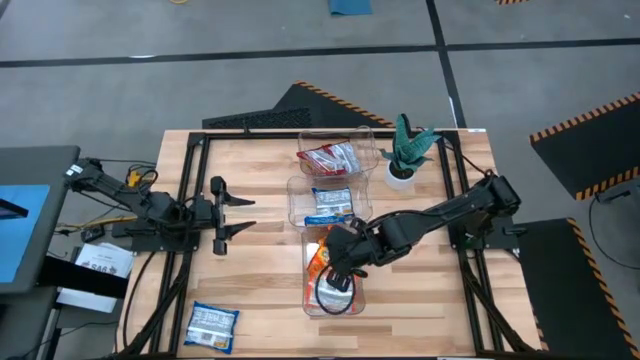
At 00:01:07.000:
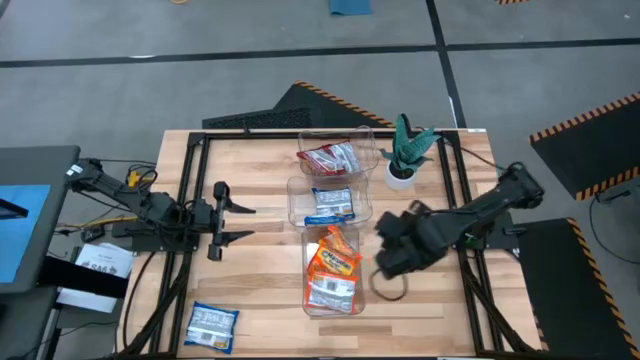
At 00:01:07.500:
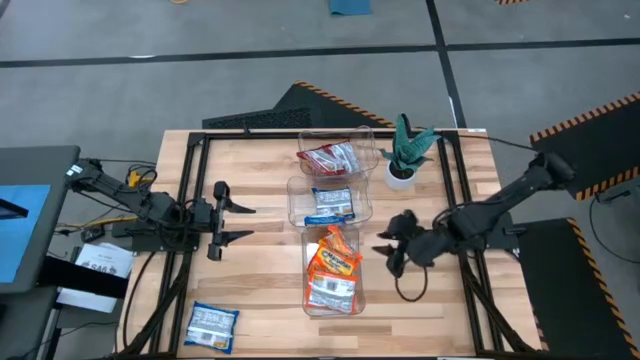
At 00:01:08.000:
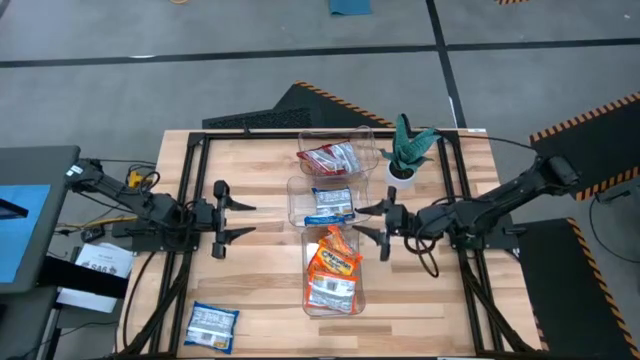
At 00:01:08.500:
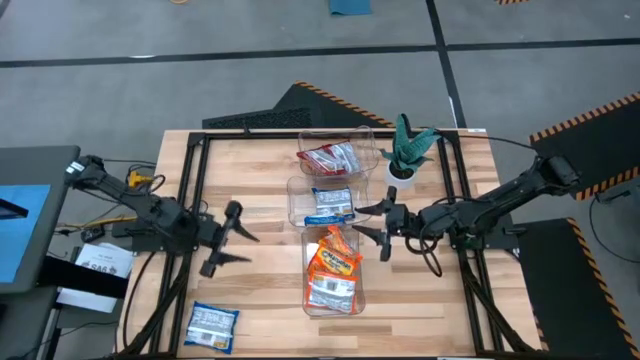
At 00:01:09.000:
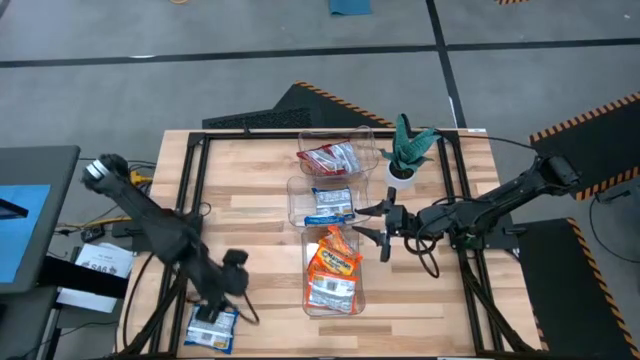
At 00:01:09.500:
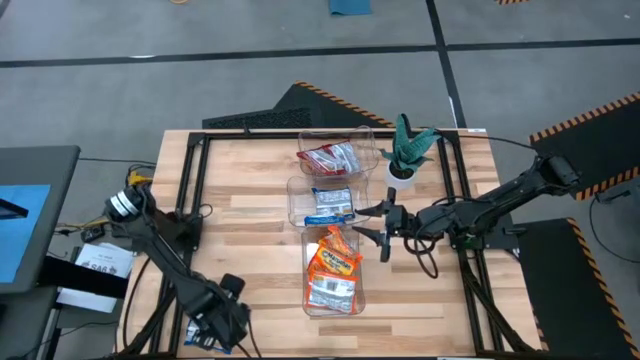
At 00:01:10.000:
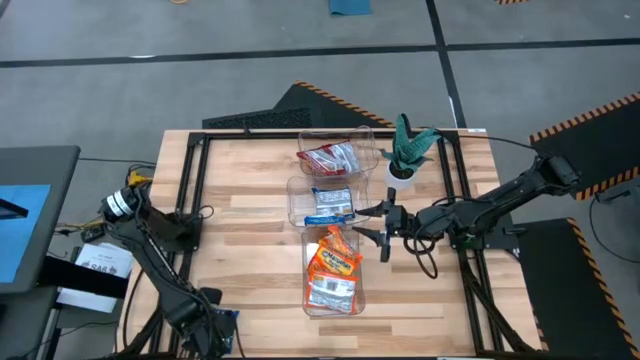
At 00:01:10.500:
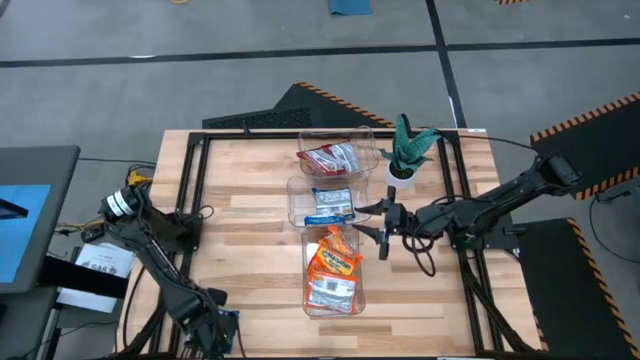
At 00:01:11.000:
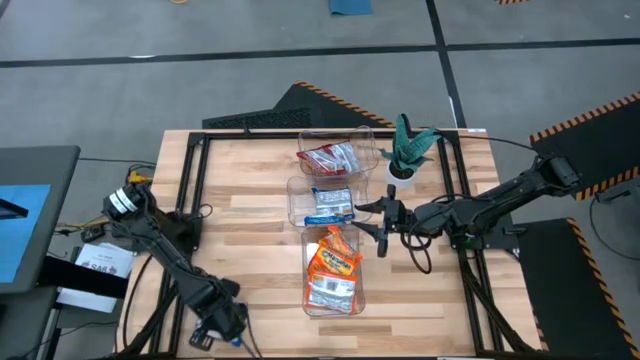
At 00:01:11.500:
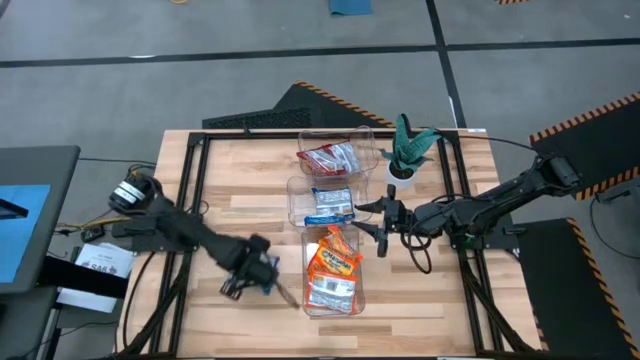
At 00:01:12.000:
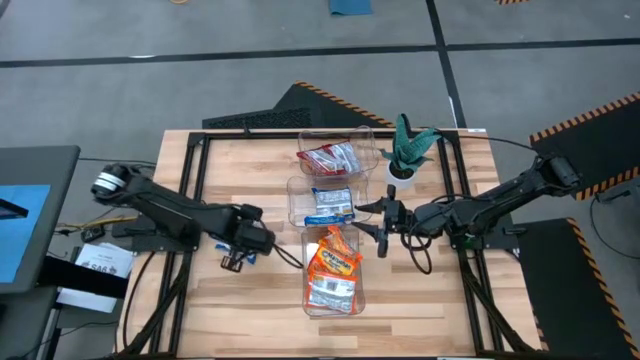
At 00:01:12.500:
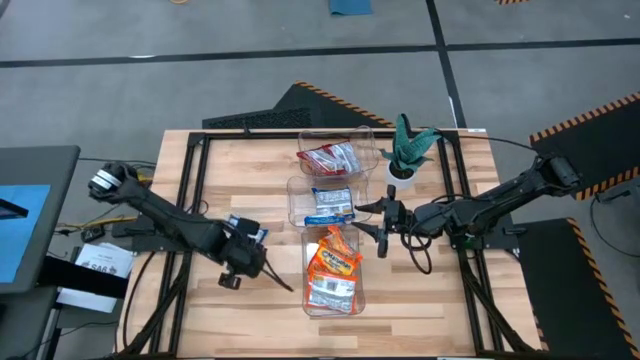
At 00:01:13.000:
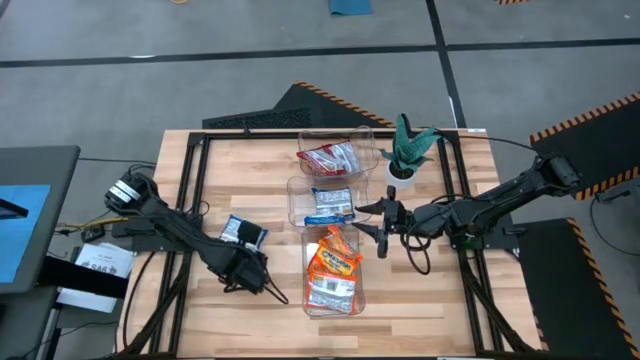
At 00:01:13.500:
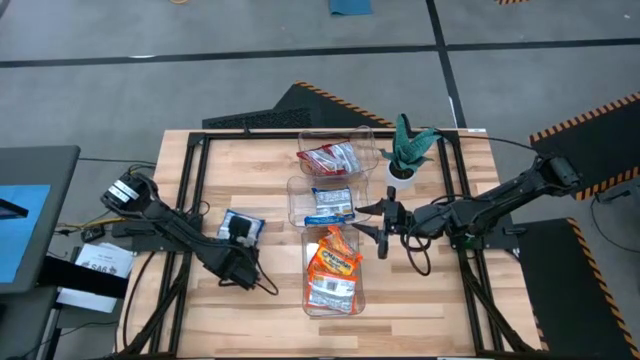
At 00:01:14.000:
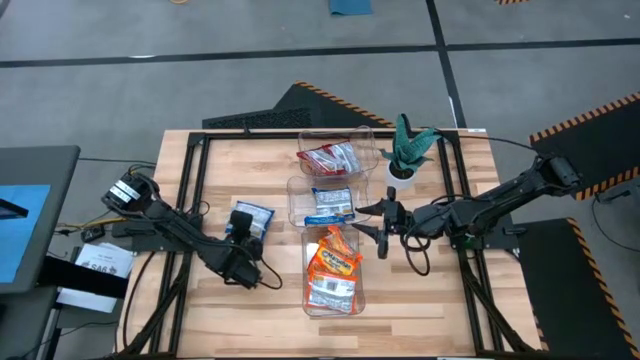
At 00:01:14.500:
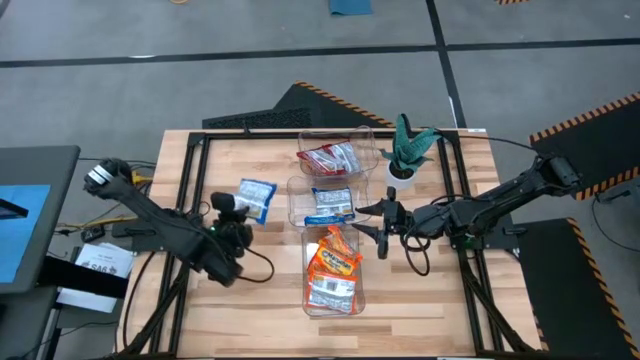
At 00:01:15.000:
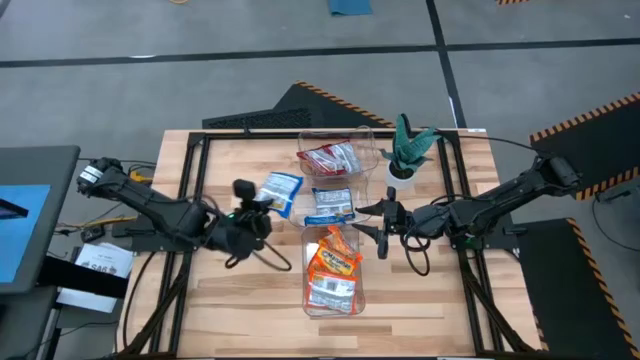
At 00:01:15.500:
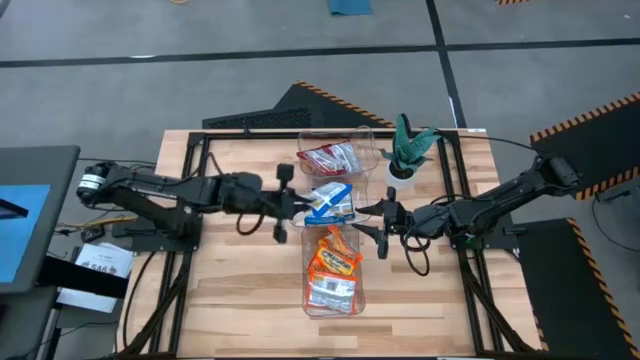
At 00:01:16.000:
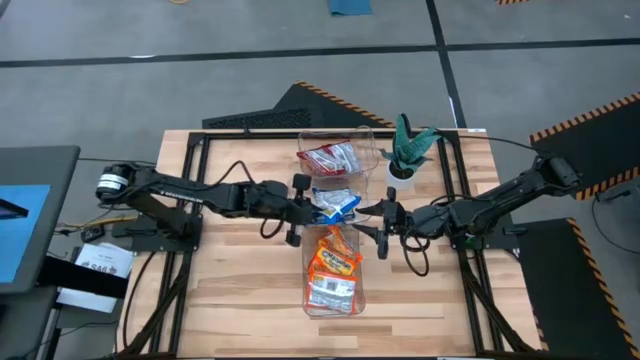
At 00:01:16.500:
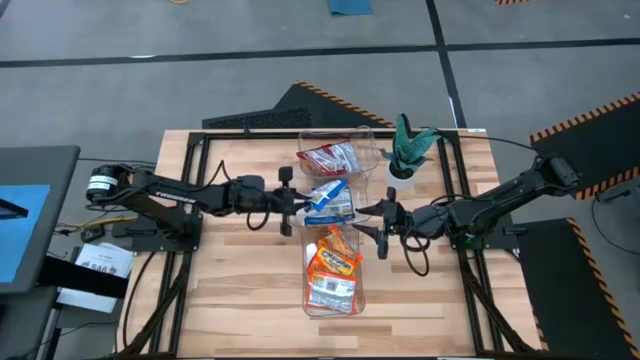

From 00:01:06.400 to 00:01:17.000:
Task: Sort Maruchan noodles
Put the blue noodle pack into the middle transparent bin

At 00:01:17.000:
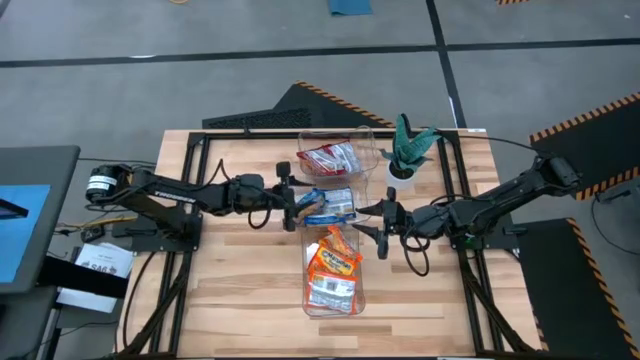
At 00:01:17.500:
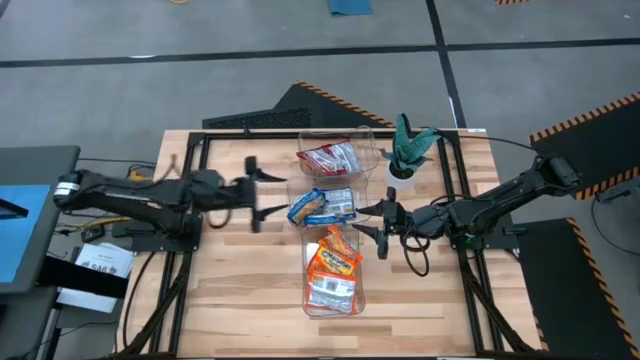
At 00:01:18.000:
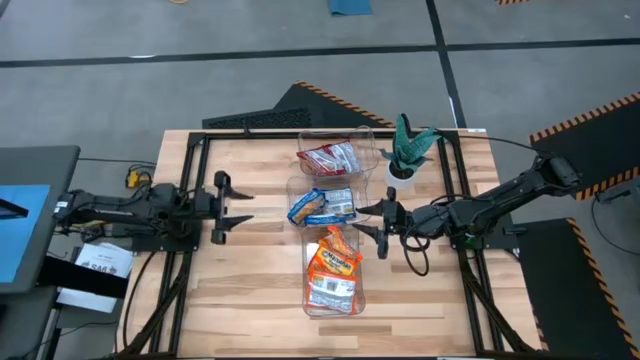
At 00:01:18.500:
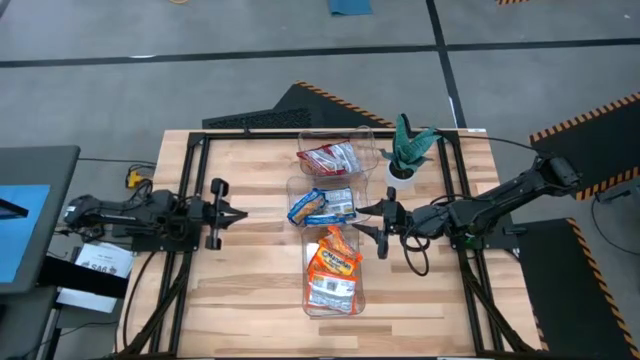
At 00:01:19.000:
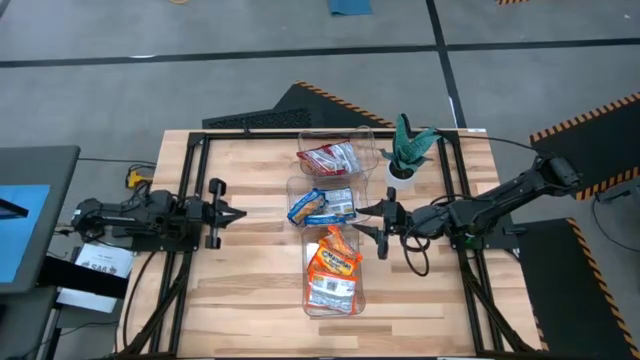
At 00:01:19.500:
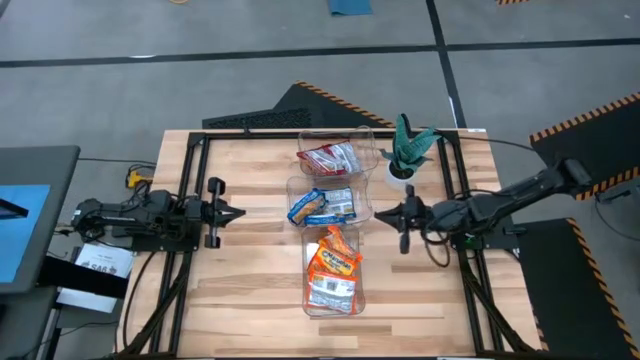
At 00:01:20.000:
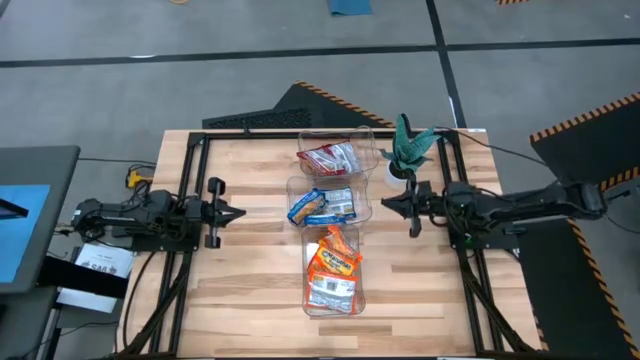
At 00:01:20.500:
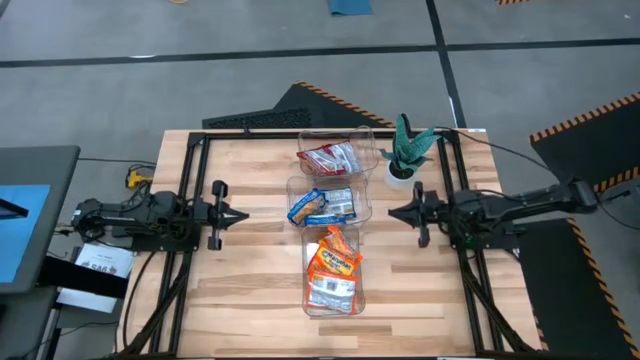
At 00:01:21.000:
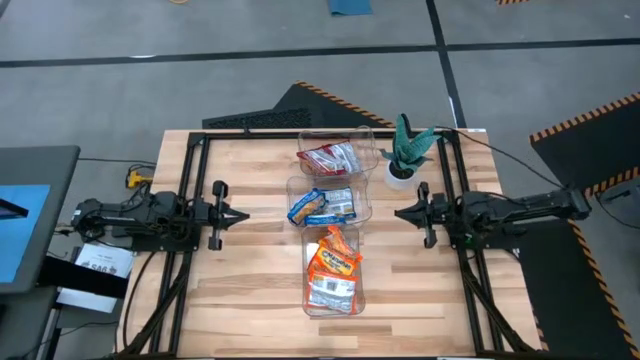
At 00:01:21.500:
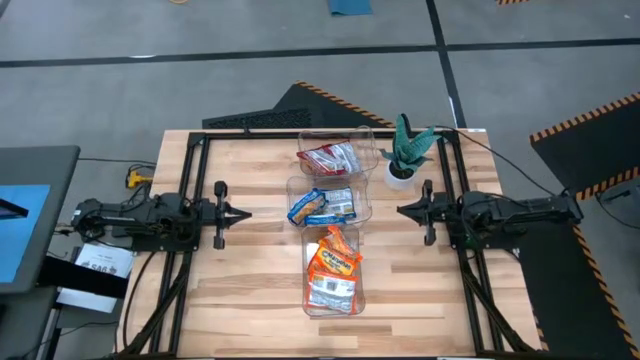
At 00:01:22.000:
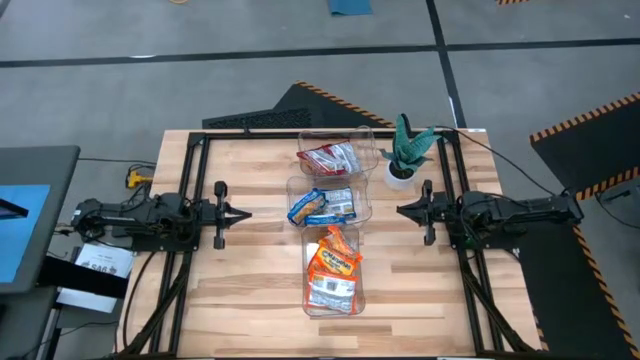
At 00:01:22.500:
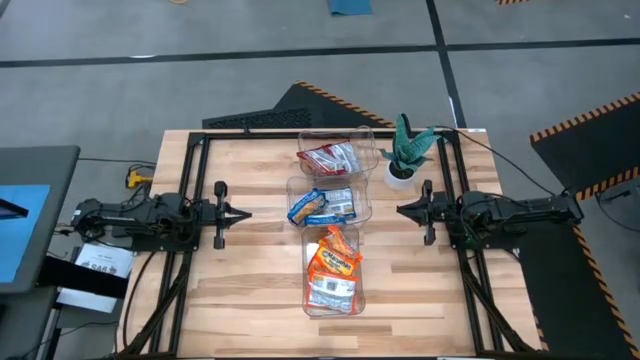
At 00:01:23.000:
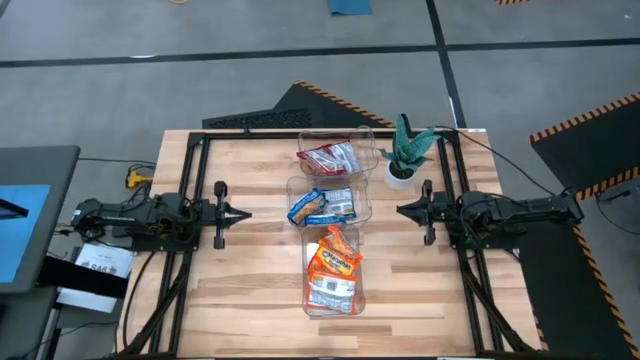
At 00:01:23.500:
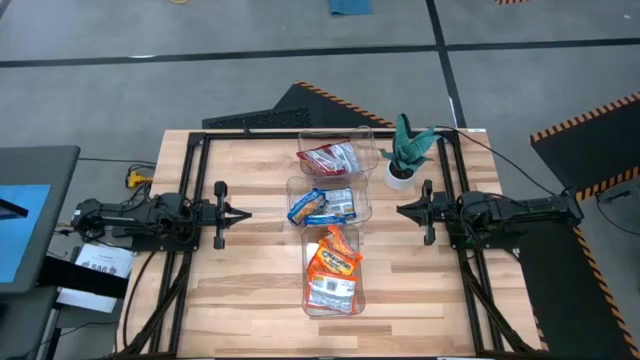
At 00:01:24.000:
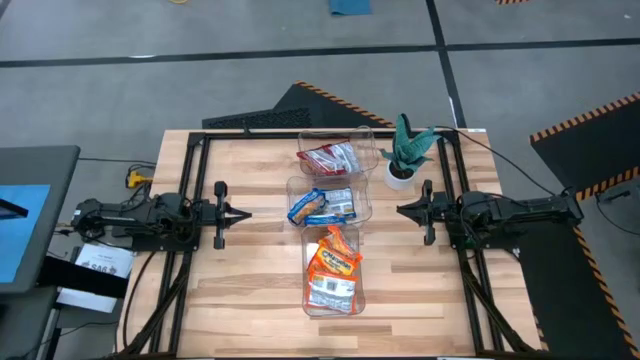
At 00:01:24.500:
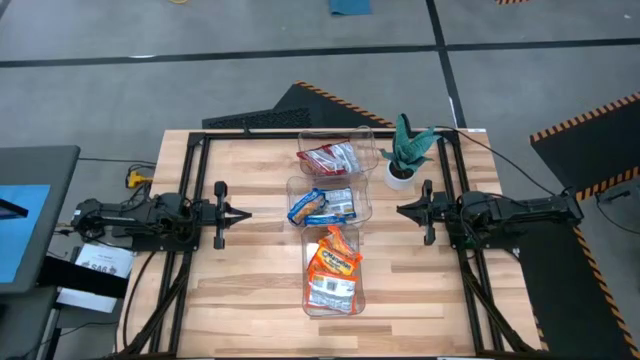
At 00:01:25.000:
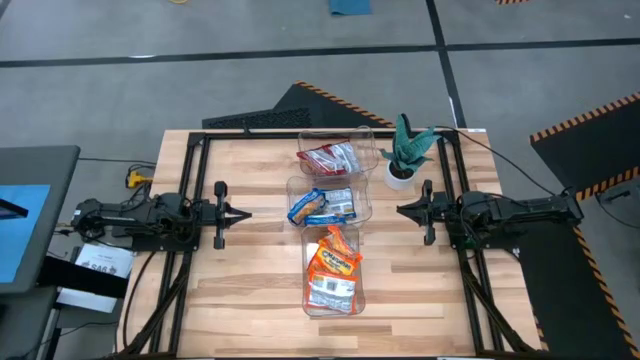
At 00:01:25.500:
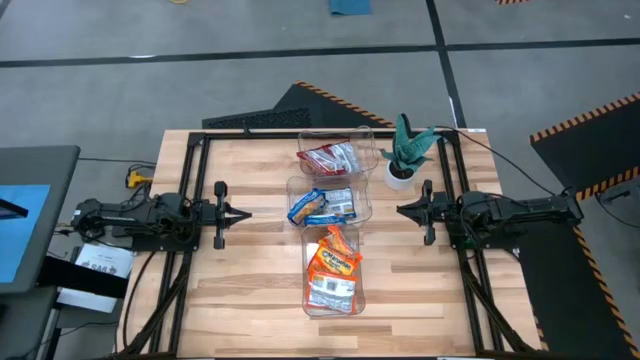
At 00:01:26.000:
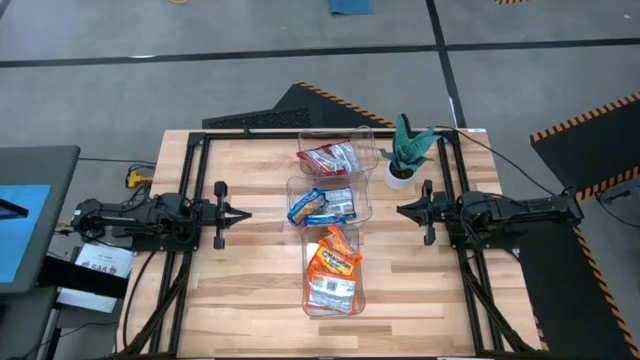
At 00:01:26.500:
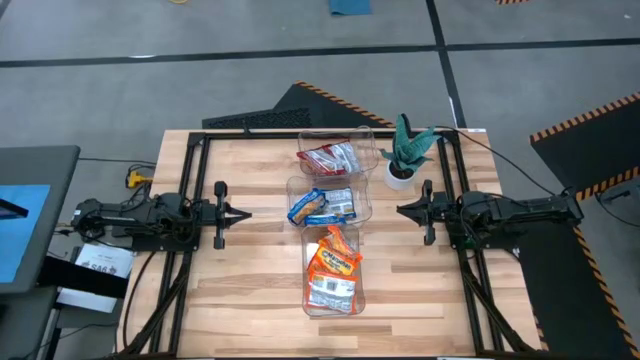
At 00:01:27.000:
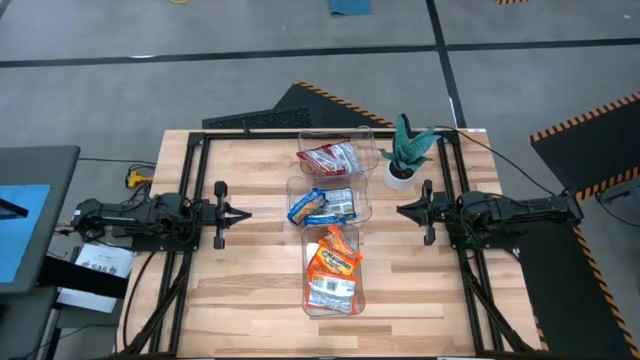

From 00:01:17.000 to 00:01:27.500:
Return to Home Position
